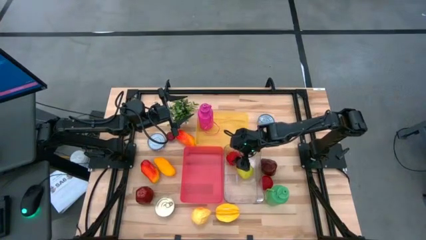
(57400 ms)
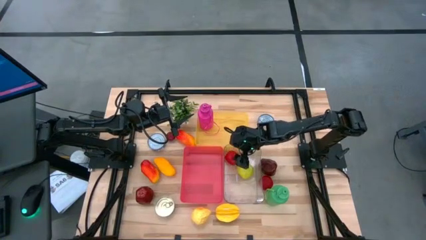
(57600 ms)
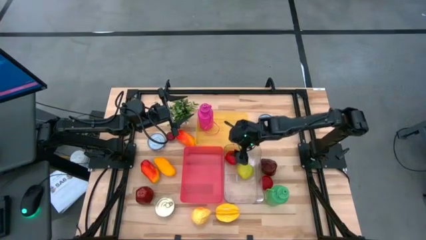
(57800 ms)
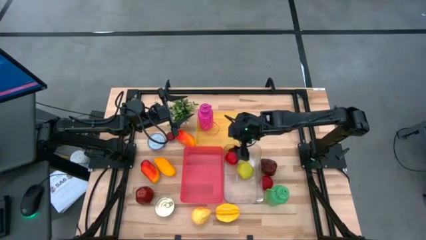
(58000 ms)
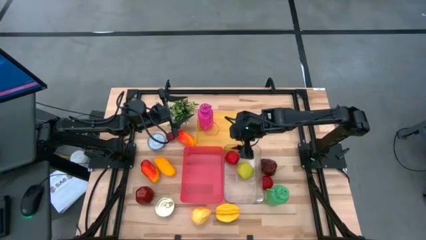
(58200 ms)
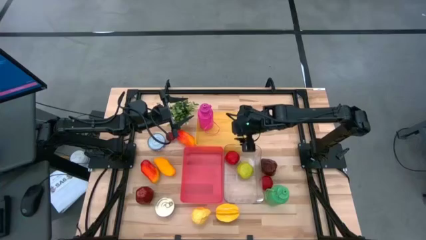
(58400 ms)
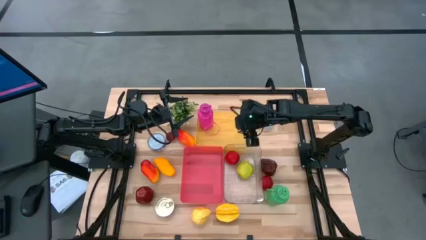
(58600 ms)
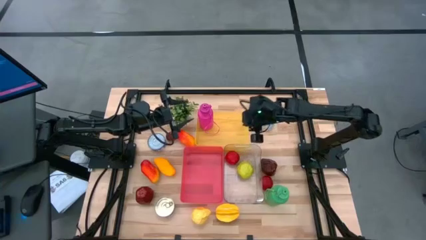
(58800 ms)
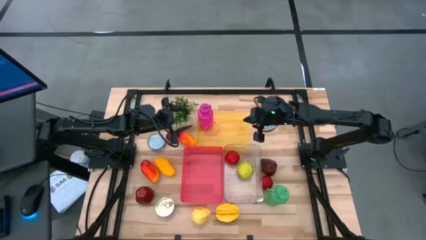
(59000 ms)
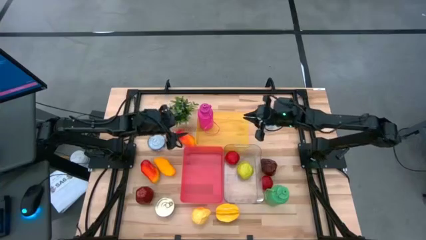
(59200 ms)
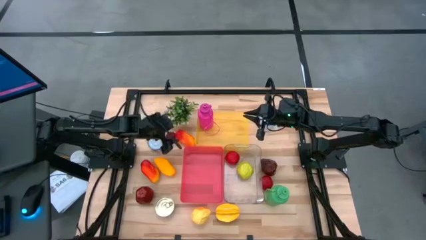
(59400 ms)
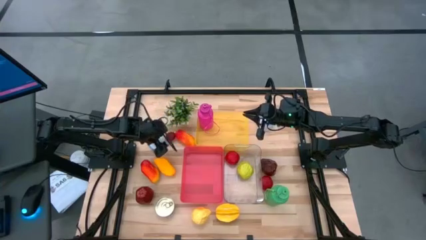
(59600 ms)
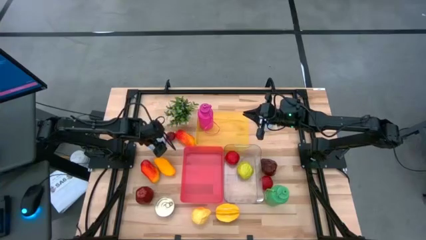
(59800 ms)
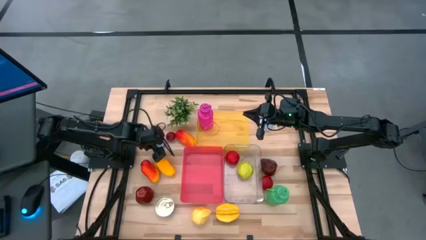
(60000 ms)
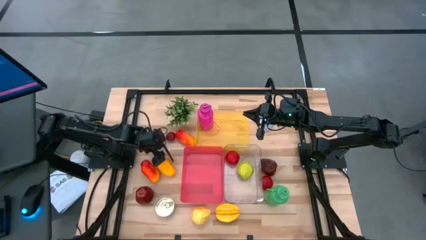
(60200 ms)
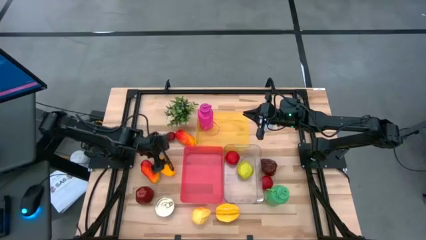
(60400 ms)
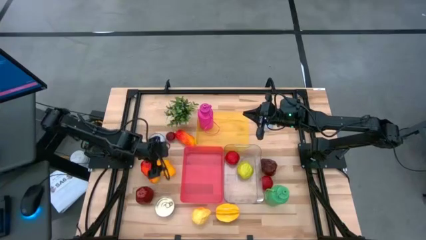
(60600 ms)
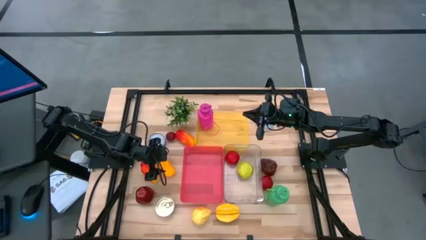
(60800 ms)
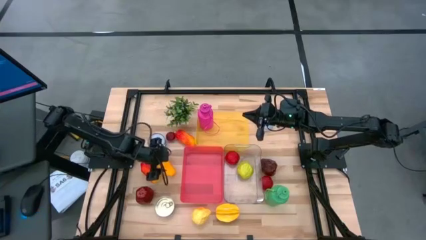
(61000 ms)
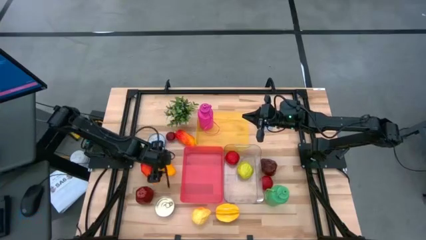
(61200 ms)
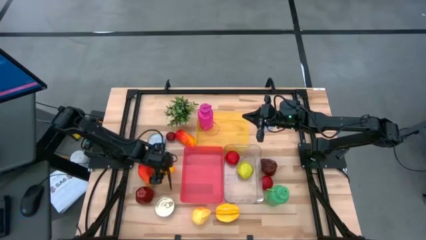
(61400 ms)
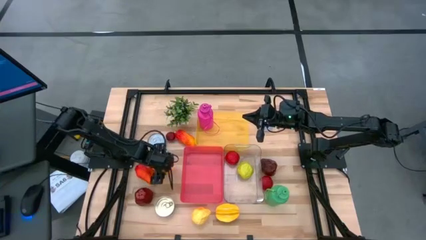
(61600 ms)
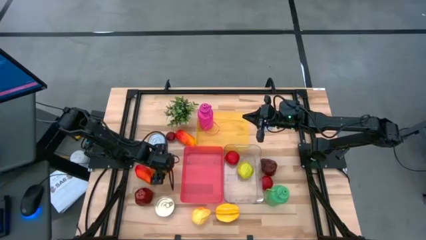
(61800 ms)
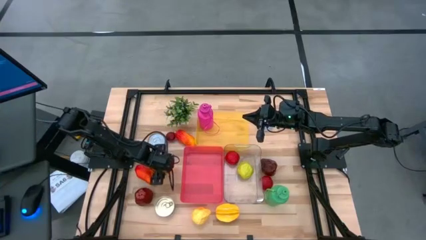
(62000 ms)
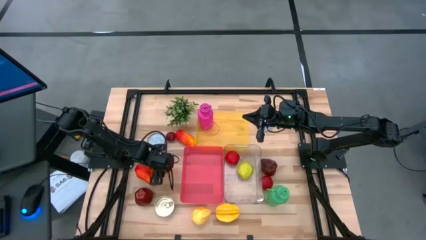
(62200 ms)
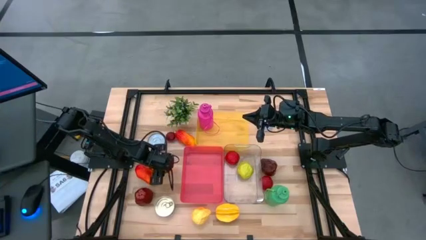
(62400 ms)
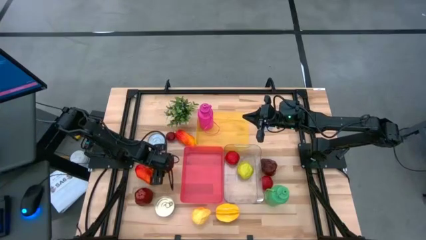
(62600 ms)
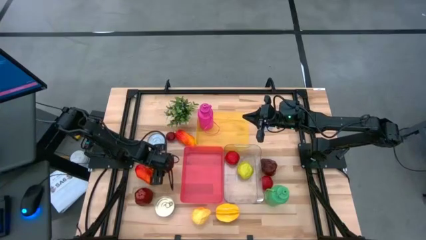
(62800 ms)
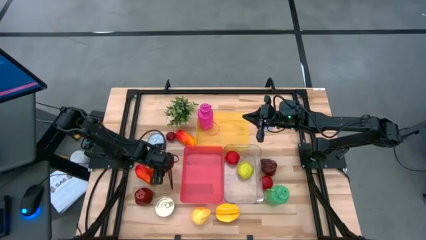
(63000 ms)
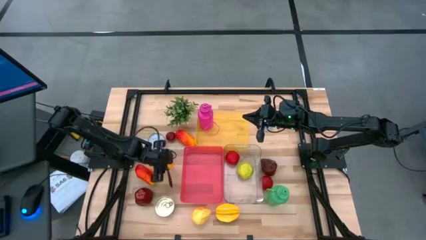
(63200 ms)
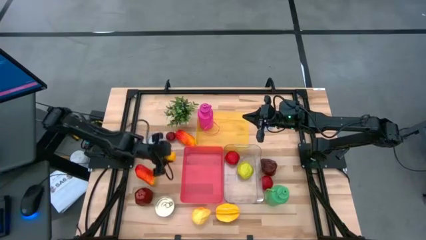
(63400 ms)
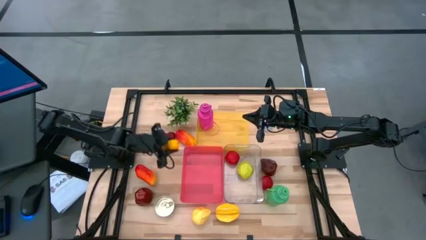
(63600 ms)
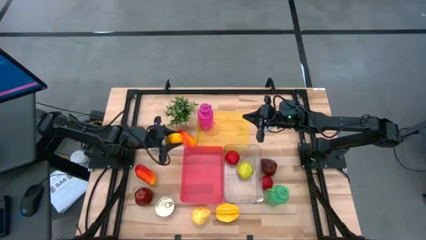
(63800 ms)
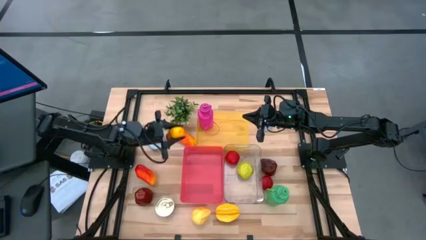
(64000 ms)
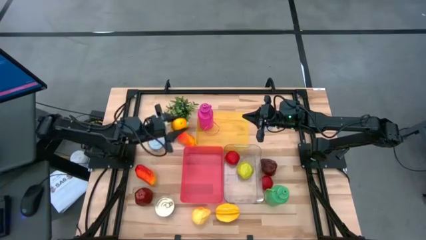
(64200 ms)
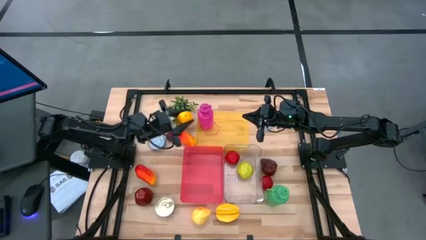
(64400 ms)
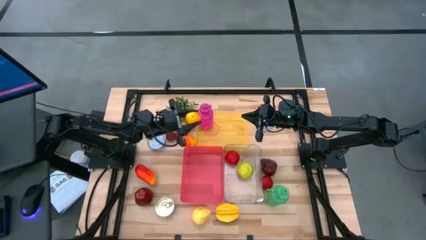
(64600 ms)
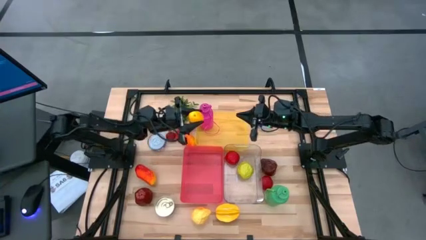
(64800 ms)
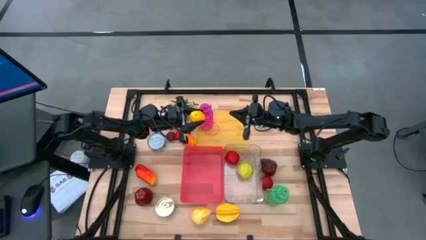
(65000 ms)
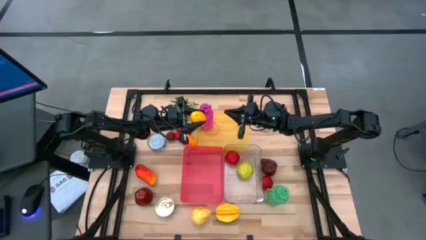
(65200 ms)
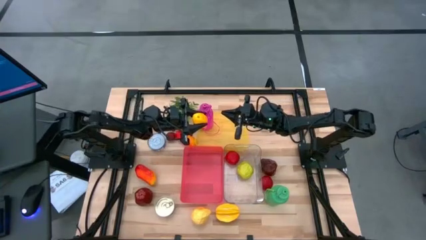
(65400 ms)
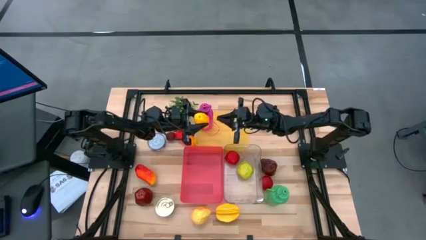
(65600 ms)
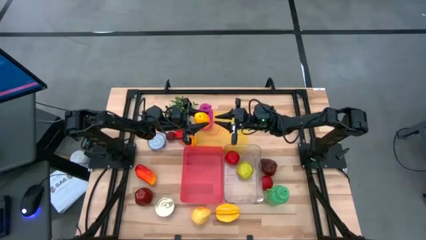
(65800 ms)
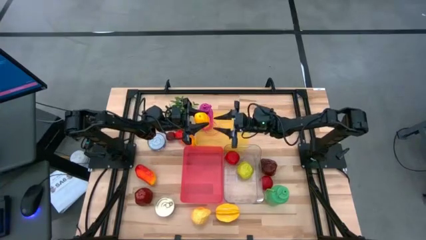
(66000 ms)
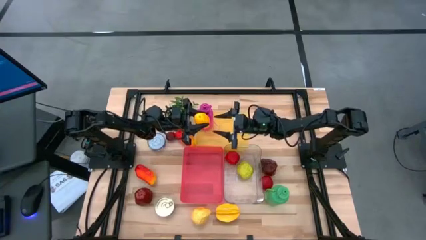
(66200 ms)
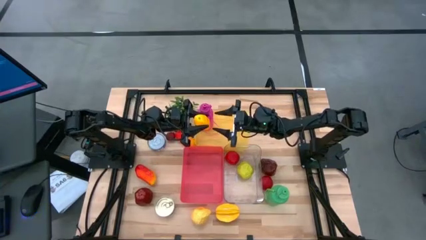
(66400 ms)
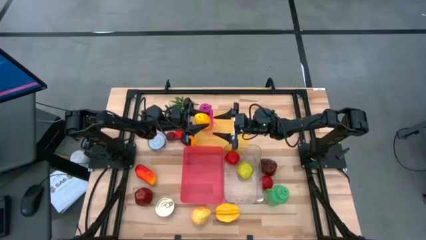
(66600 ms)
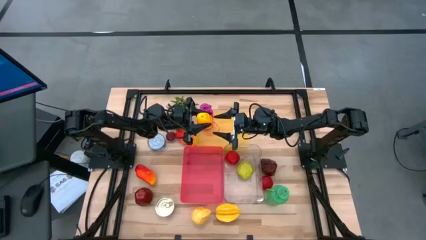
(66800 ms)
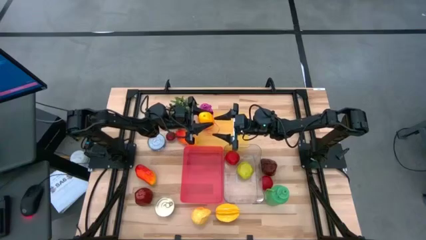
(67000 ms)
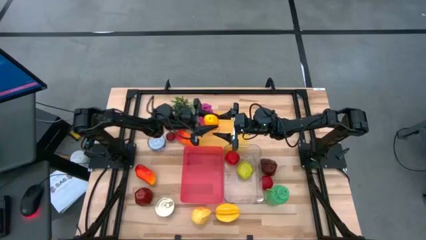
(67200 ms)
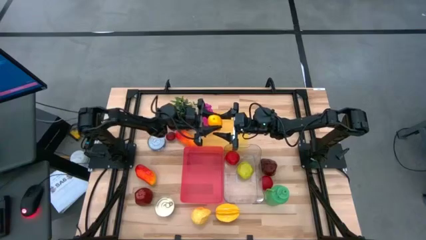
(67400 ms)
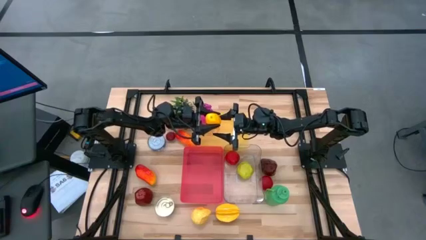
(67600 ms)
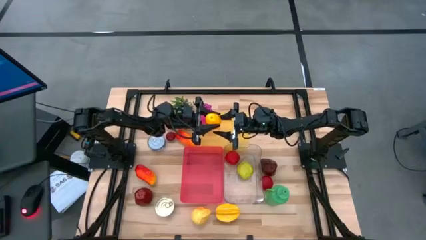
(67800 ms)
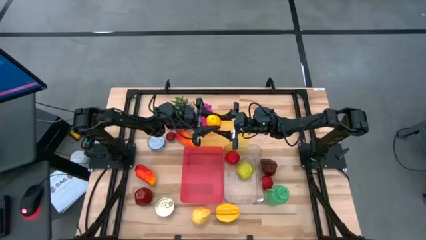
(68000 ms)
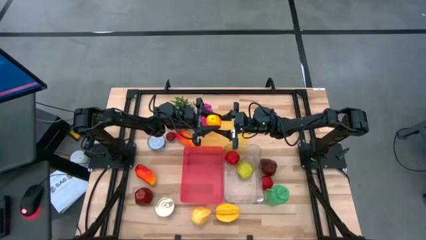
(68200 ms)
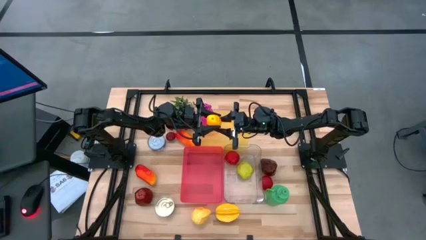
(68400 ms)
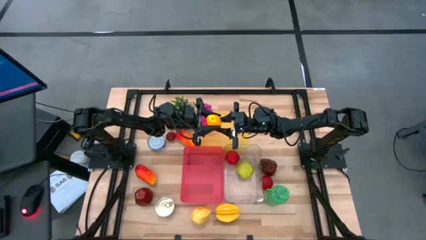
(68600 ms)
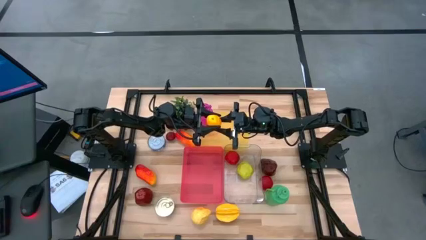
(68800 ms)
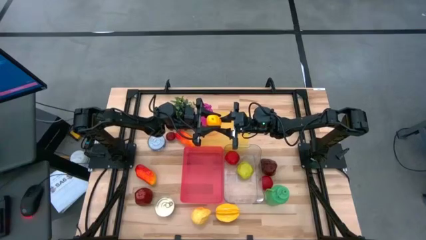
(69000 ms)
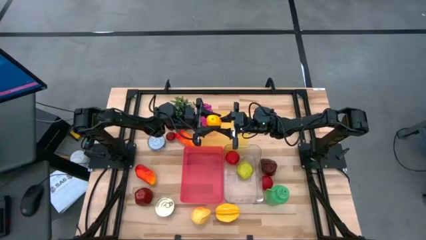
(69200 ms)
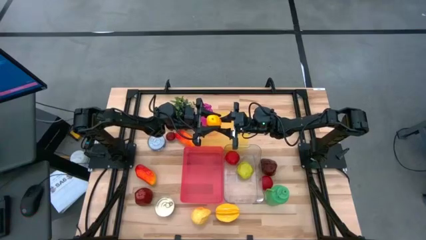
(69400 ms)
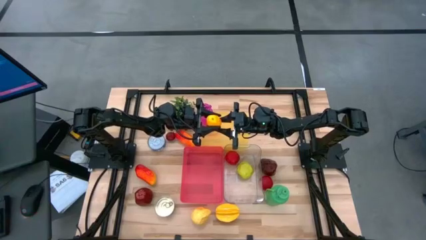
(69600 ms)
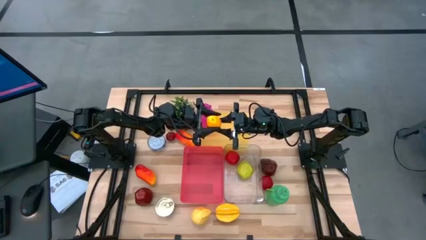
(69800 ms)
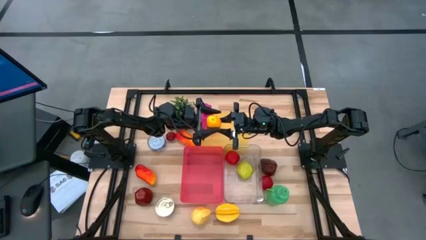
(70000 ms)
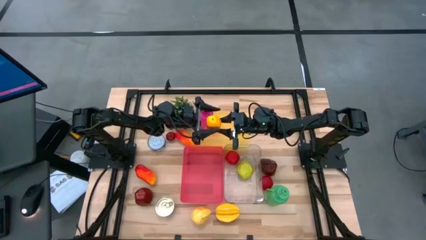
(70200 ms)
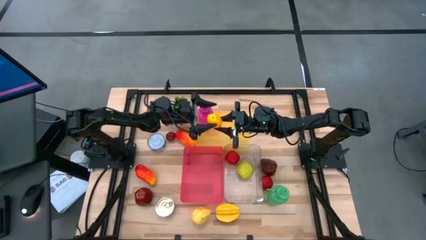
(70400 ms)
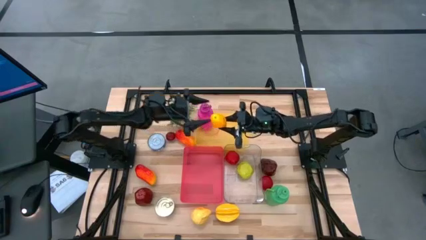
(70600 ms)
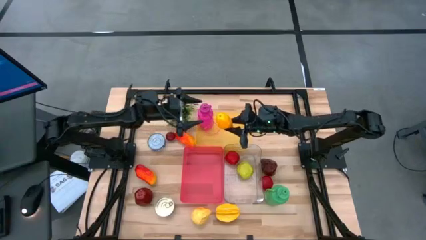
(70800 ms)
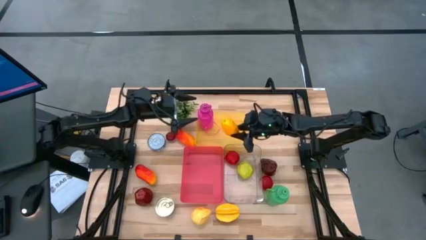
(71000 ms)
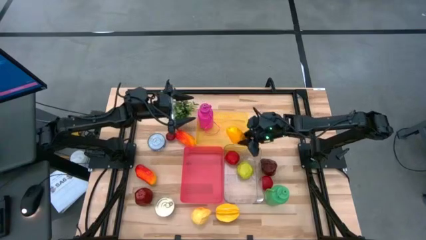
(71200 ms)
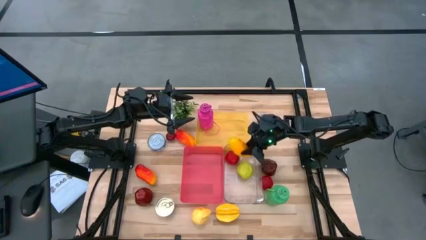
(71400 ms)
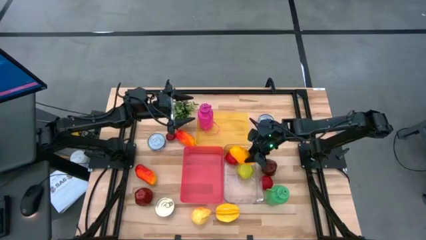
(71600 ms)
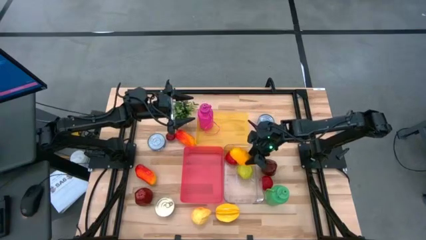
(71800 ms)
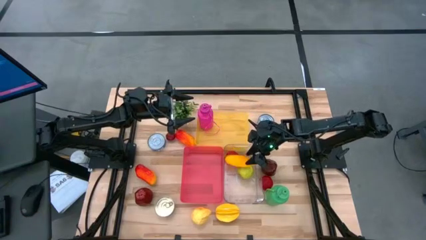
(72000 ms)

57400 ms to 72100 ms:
Task: Pick & Place Food Item
Put the middle mango on the center into the transparent bin
